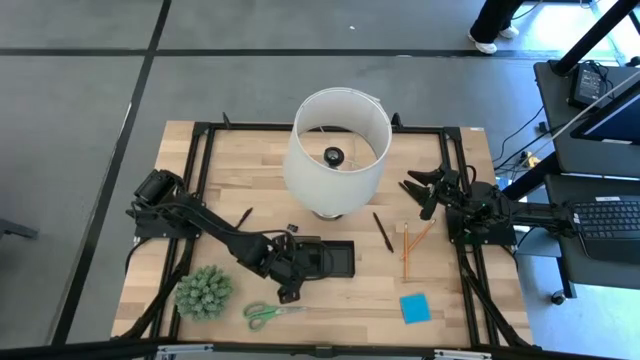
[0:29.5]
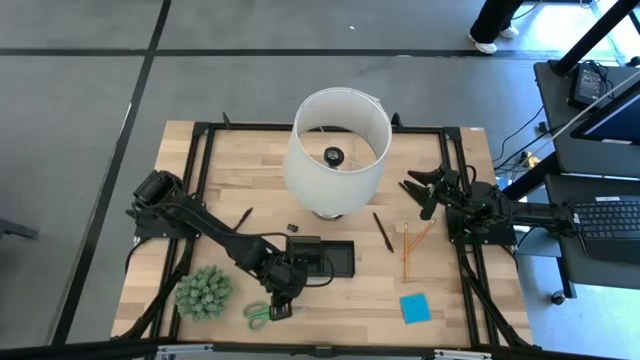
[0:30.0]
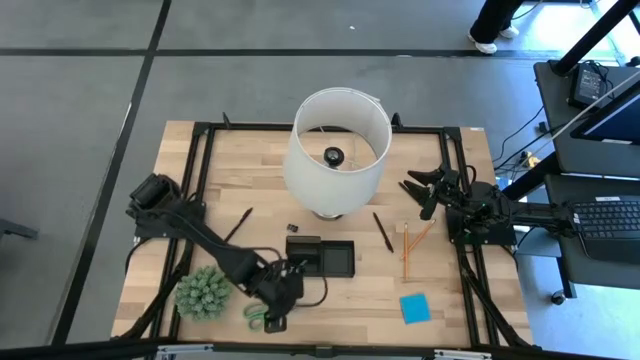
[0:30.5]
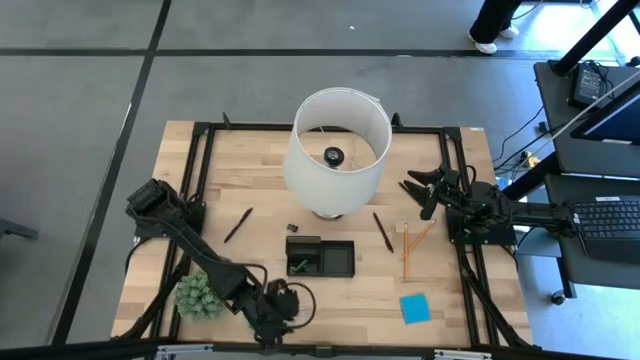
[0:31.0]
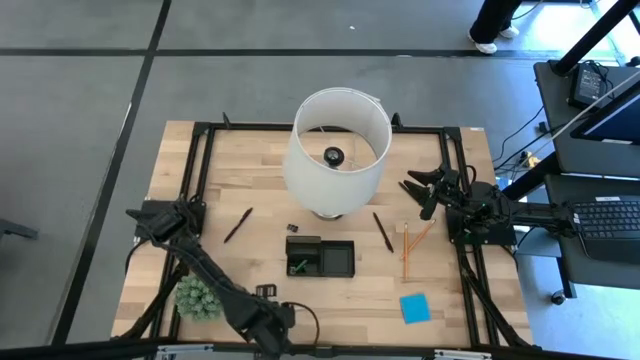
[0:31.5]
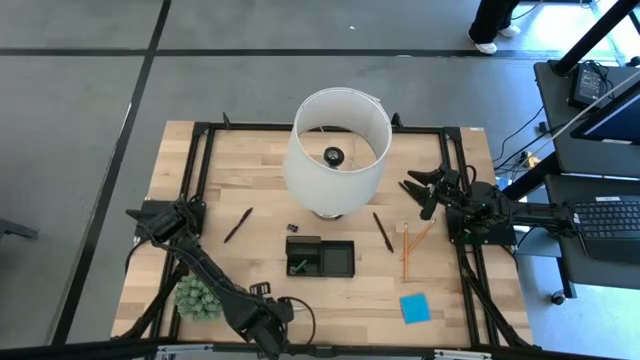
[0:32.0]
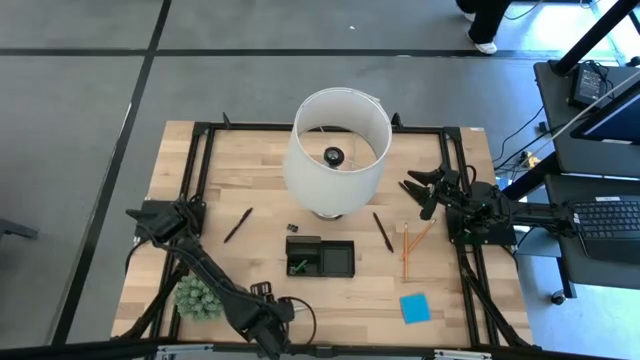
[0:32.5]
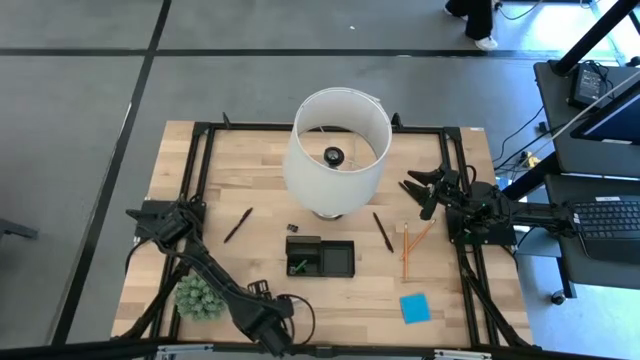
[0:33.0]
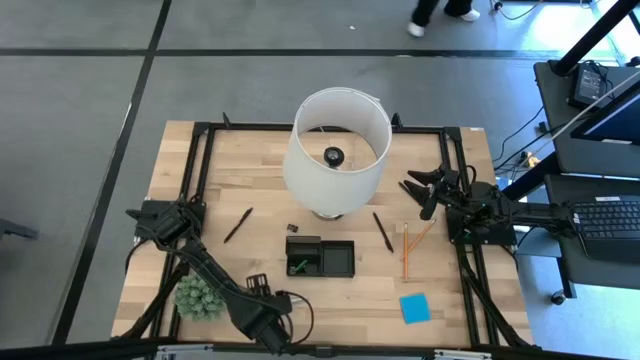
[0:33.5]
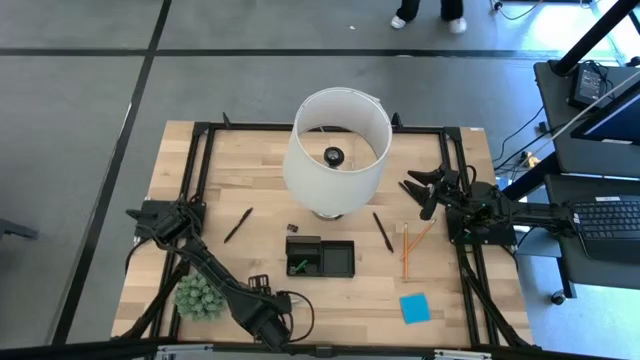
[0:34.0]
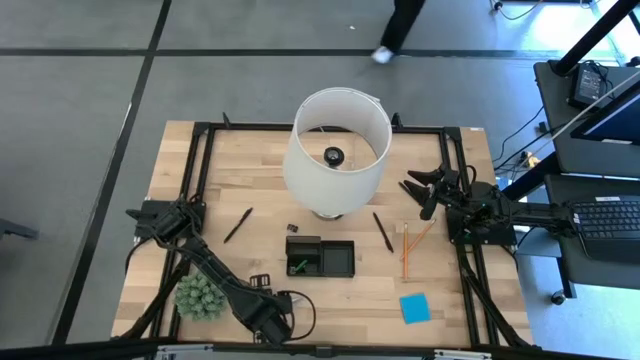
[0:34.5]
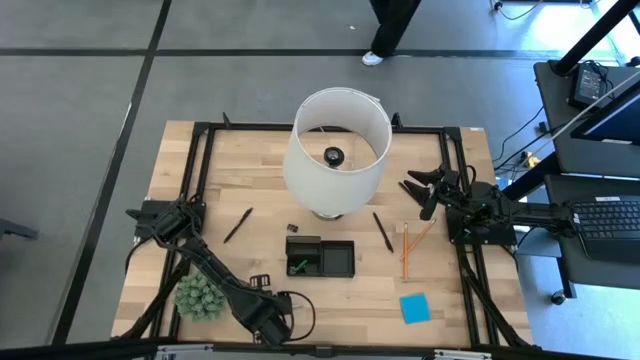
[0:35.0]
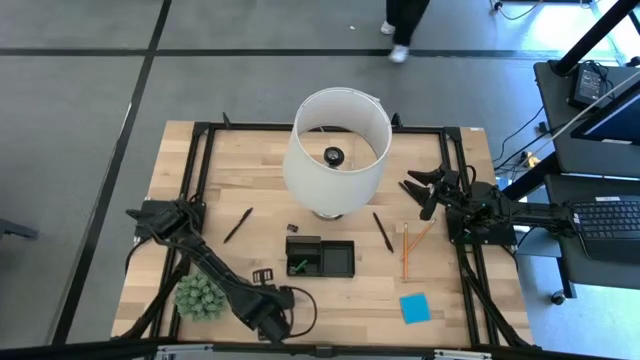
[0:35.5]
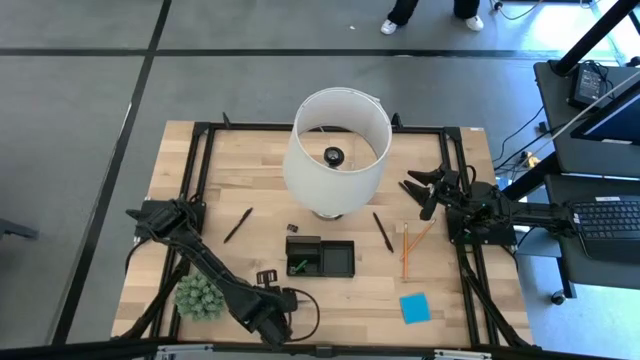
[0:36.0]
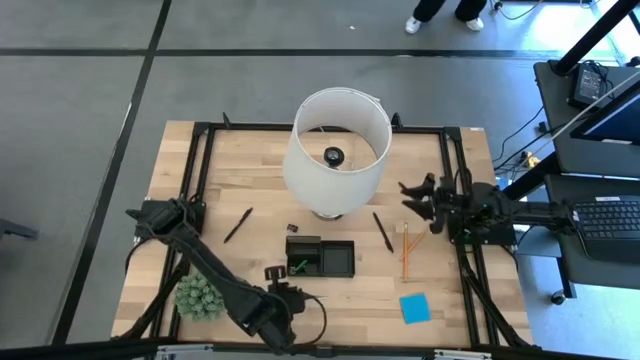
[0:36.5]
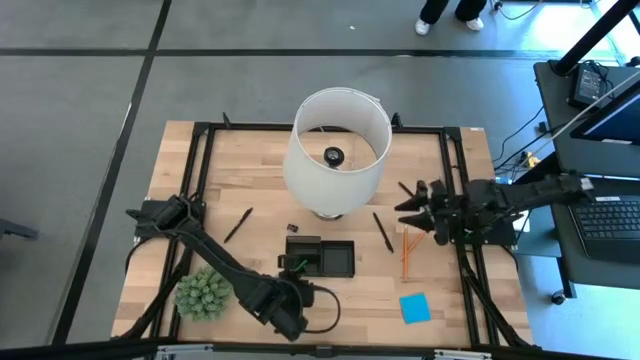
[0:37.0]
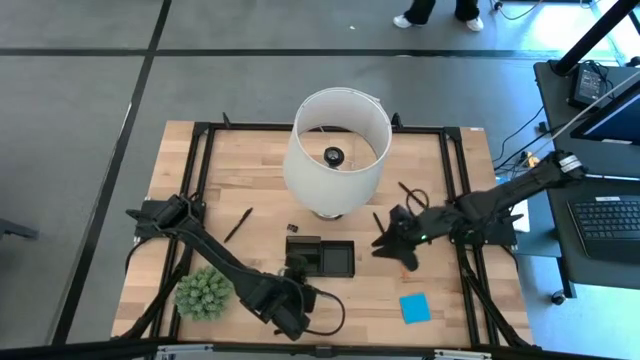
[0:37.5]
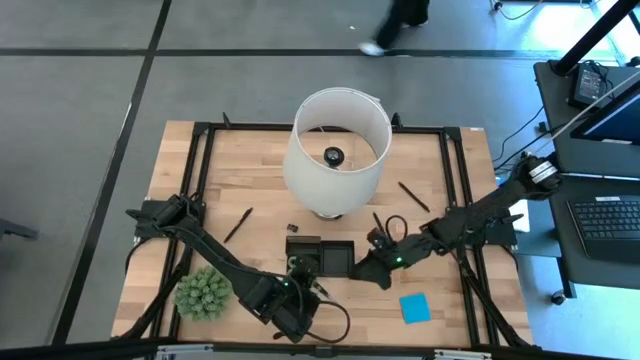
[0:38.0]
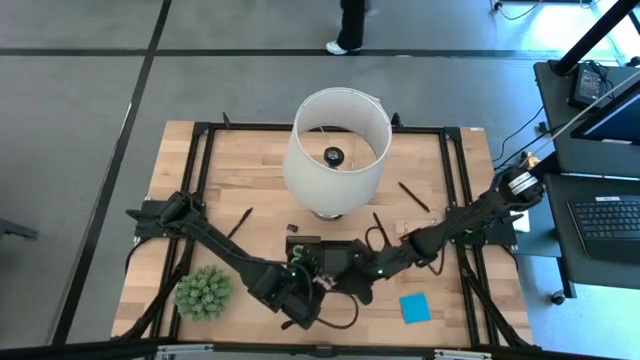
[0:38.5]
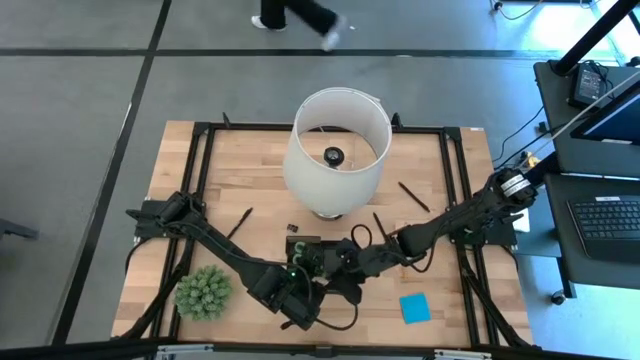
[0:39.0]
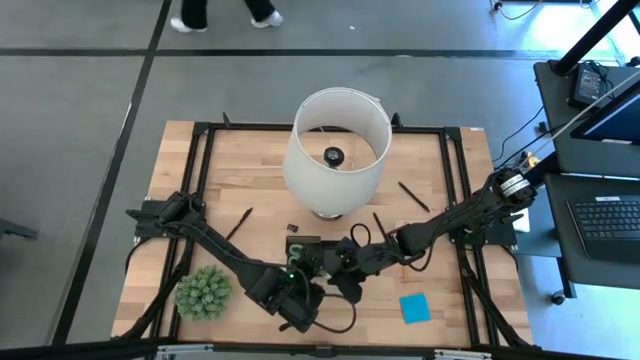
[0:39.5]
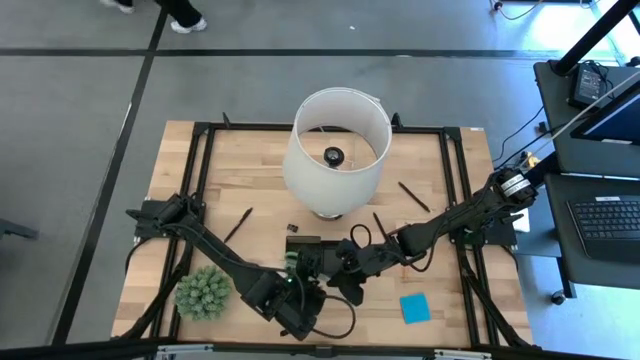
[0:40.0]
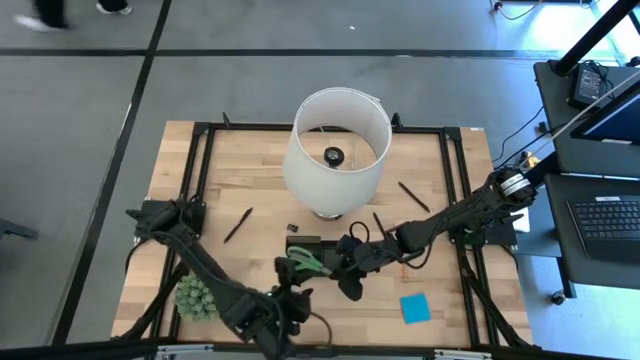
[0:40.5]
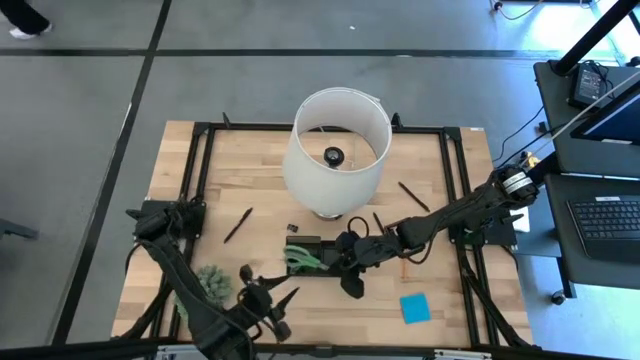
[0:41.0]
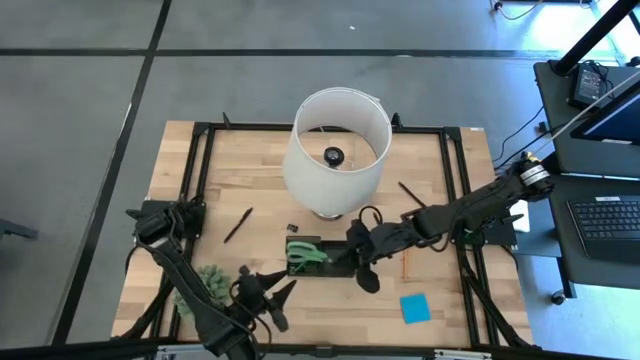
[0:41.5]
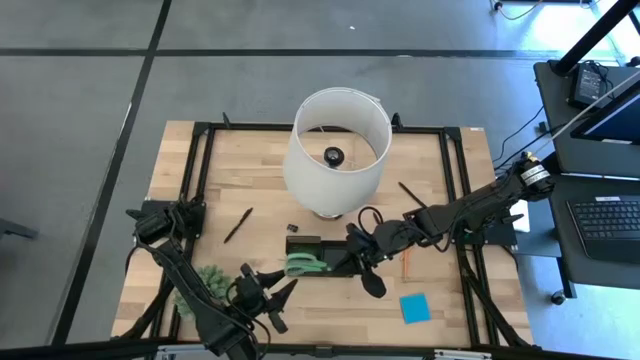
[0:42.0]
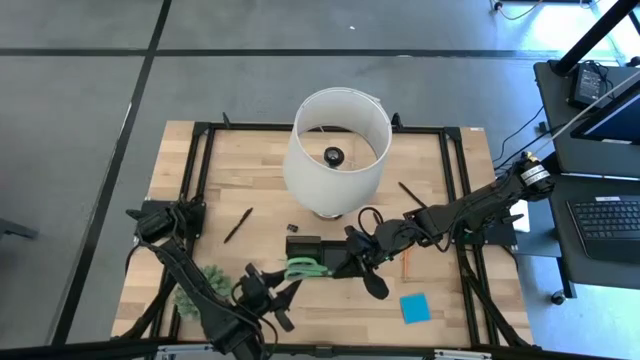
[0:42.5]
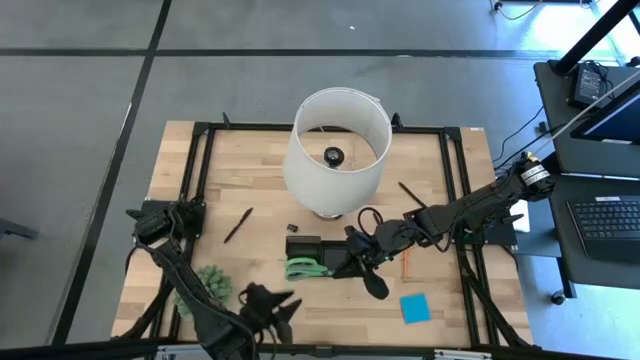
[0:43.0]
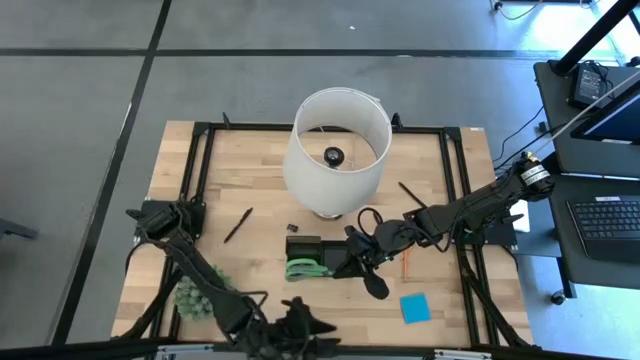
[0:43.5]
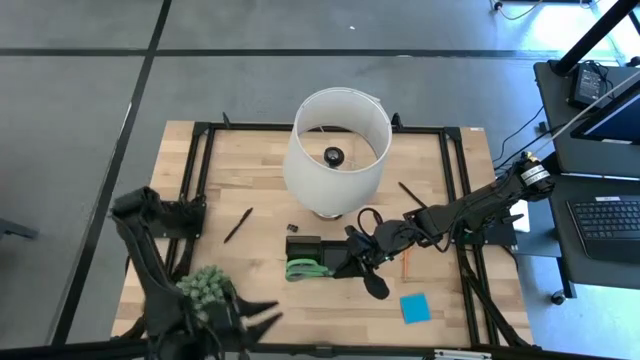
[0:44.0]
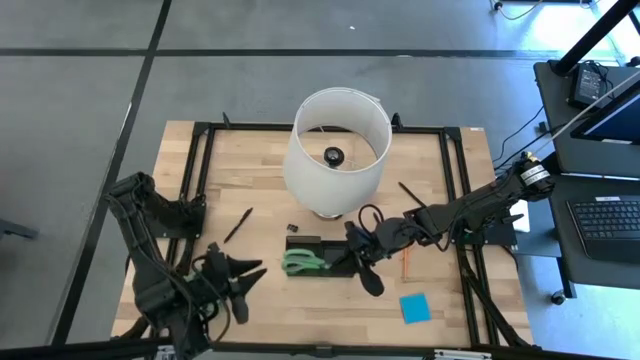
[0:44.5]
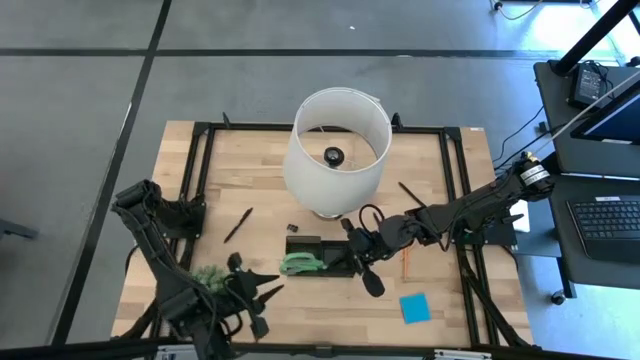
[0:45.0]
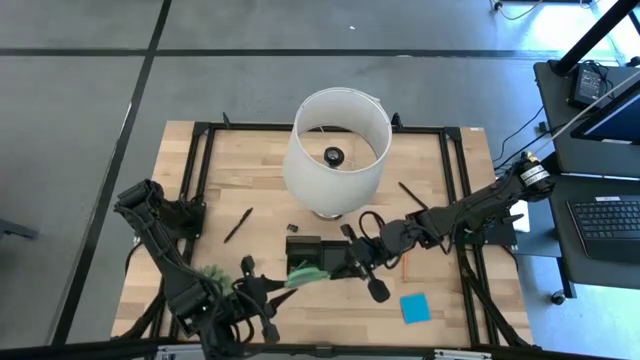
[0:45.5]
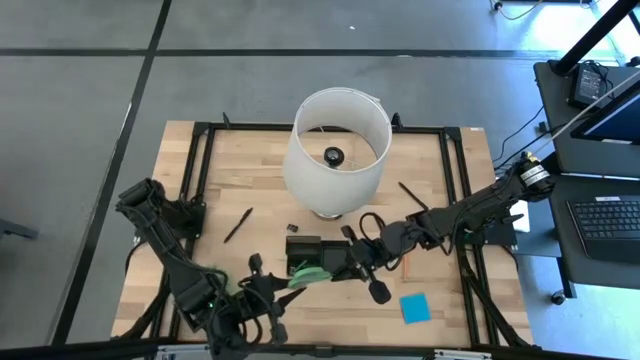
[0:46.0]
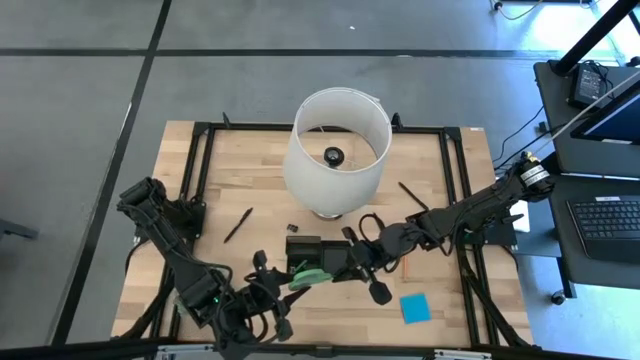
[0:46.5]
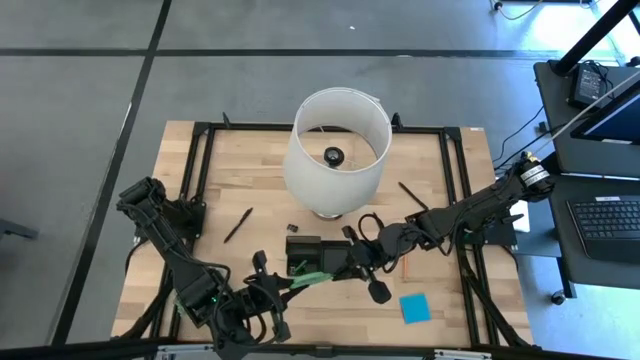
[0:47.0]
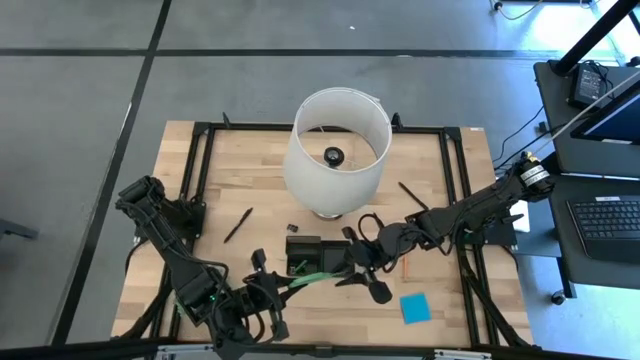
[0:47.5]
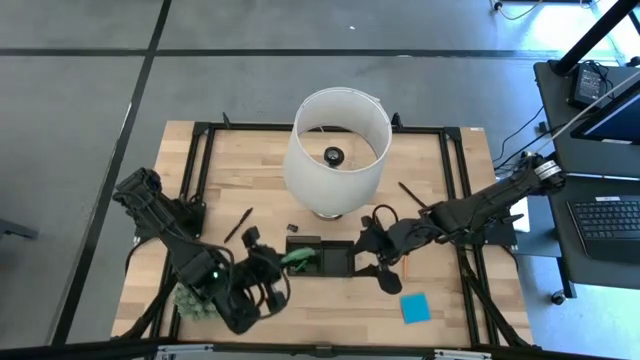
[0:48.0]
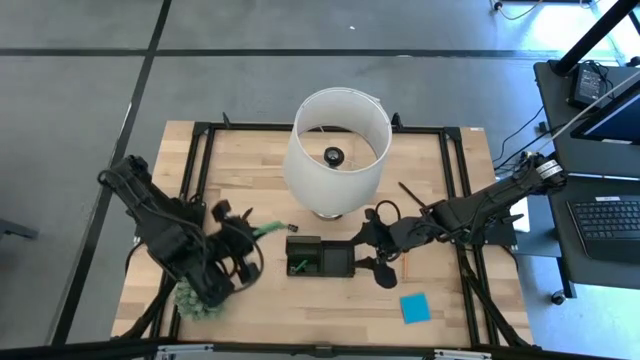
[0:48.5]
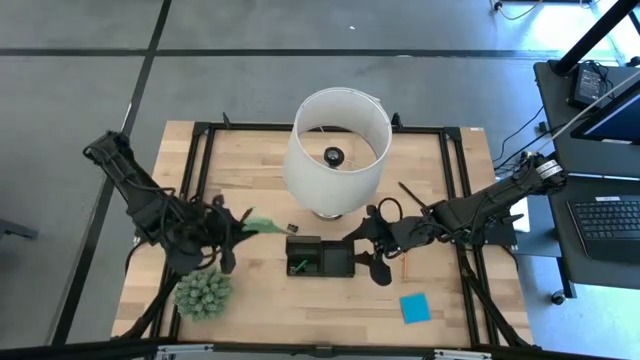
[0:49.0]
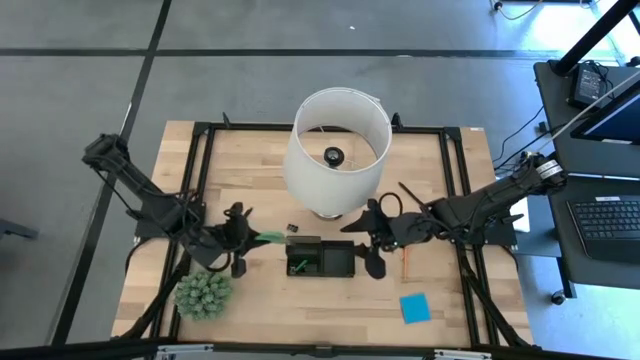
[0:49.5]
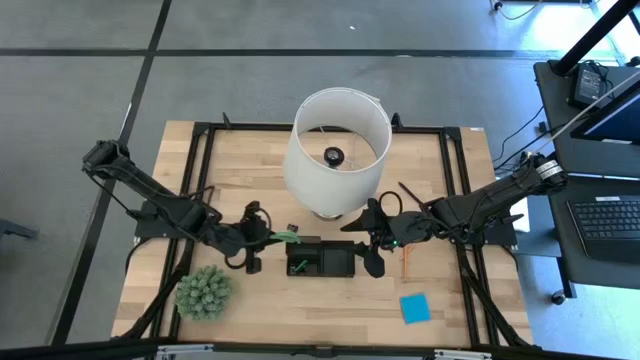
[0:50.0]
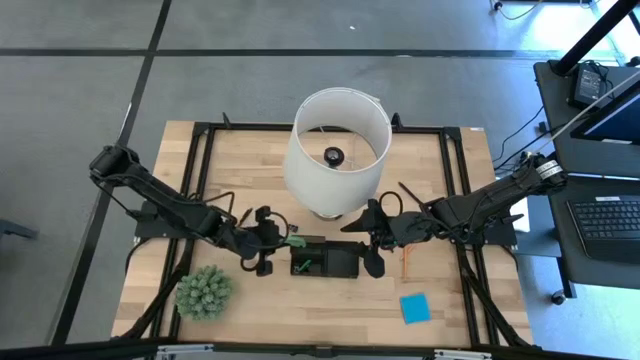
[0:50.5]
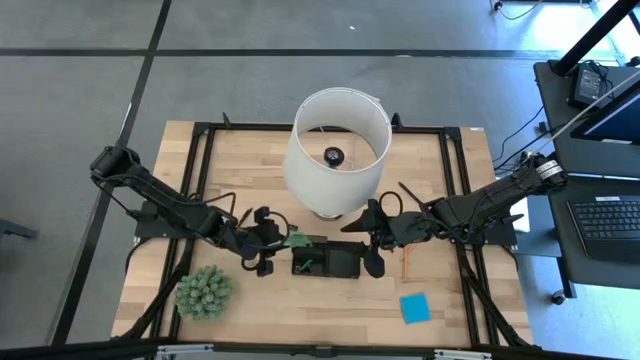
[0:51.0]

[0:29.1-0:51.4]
Task: Pick and place office supplies into organizer
Put the green scissors into the black desk organizer
